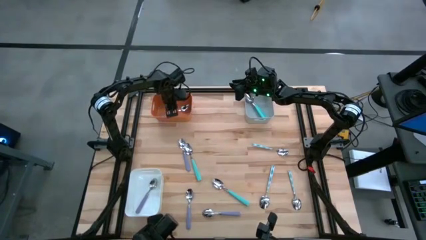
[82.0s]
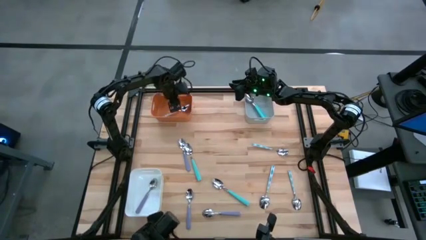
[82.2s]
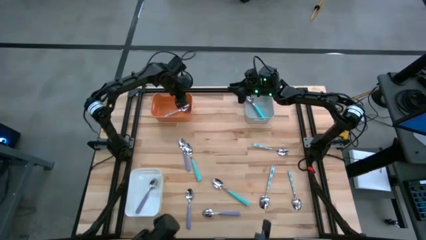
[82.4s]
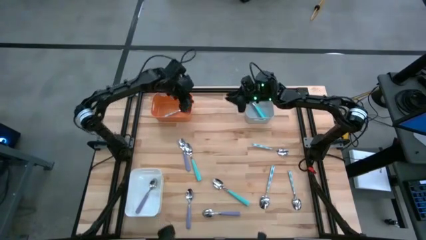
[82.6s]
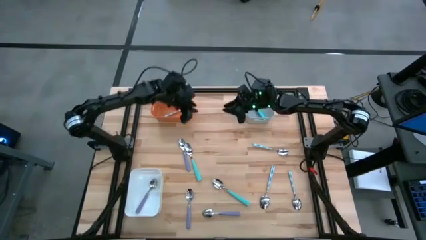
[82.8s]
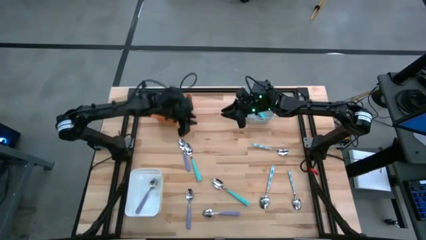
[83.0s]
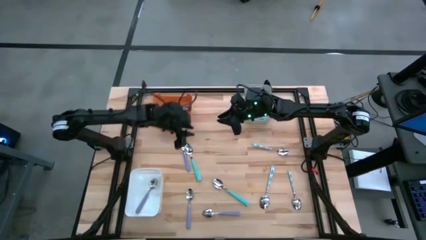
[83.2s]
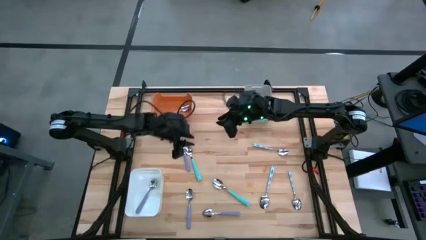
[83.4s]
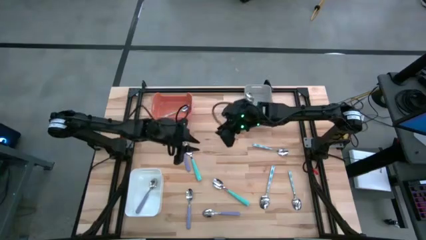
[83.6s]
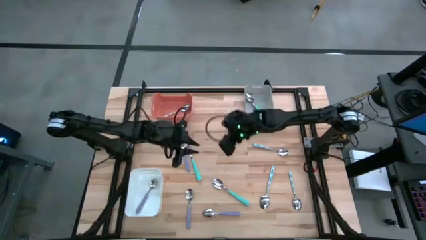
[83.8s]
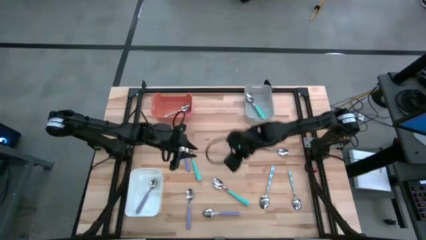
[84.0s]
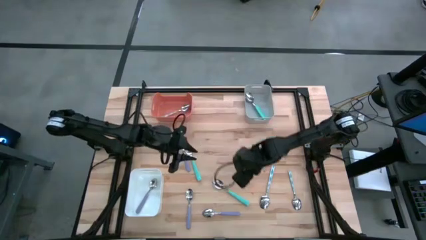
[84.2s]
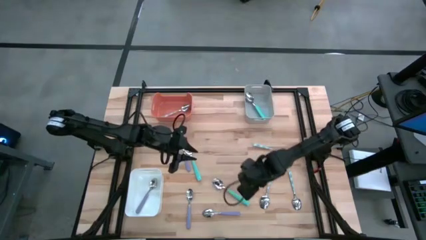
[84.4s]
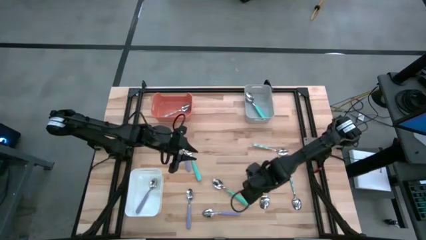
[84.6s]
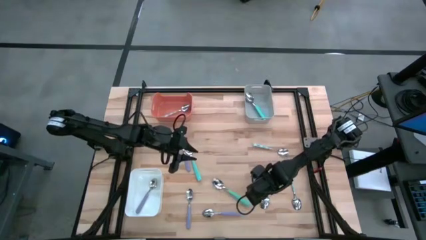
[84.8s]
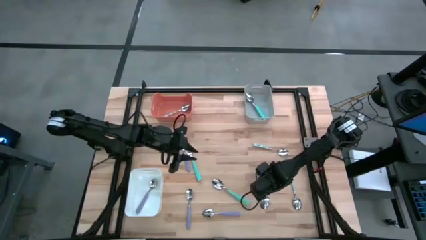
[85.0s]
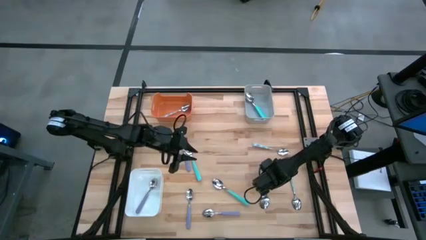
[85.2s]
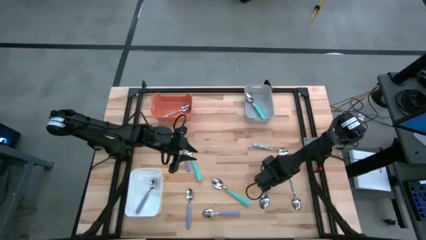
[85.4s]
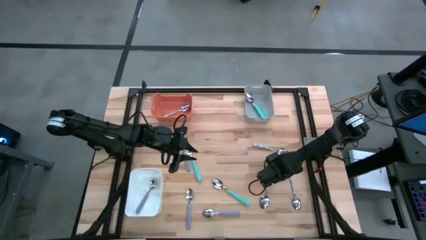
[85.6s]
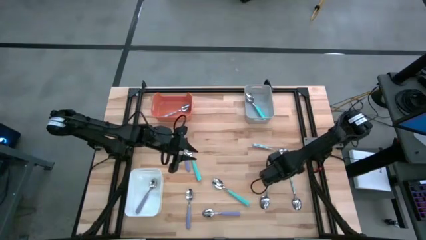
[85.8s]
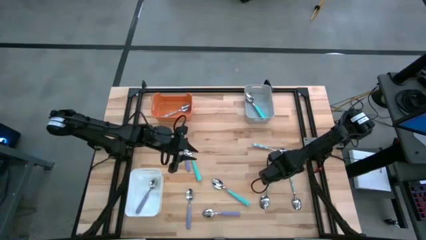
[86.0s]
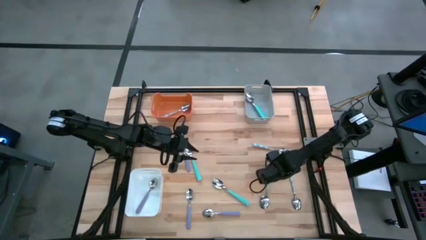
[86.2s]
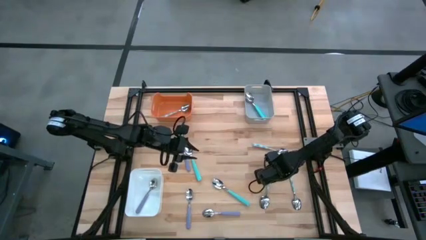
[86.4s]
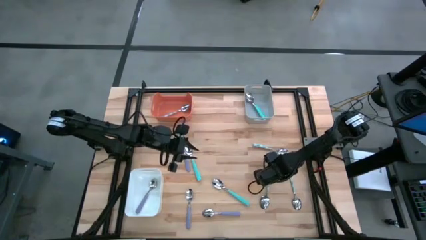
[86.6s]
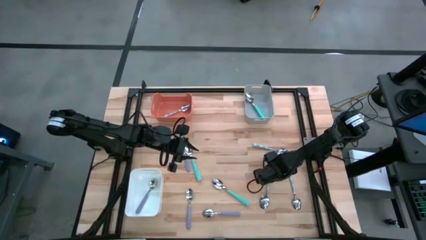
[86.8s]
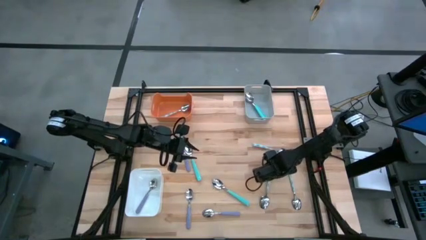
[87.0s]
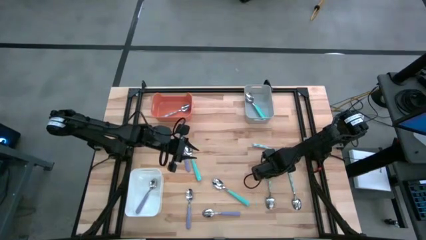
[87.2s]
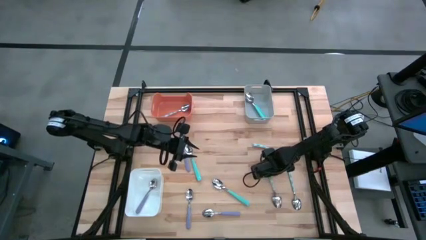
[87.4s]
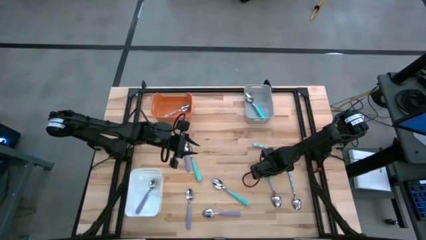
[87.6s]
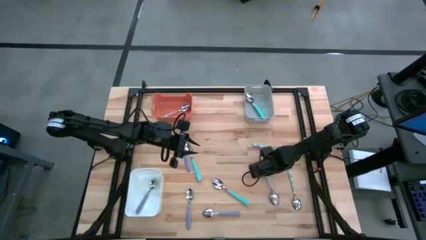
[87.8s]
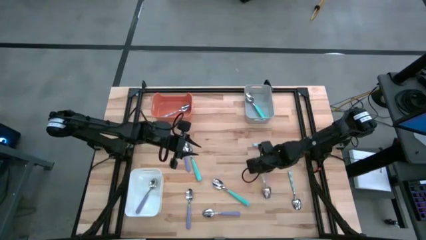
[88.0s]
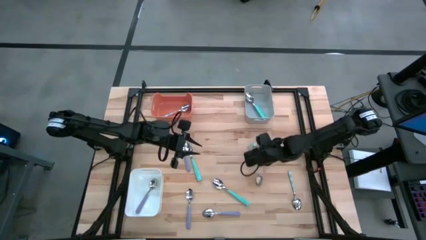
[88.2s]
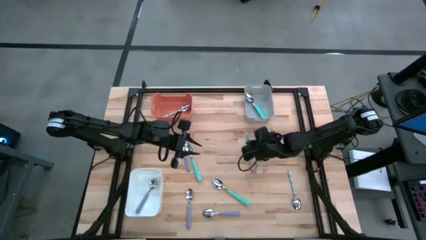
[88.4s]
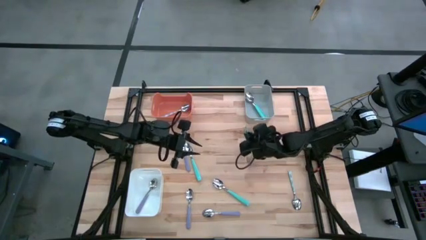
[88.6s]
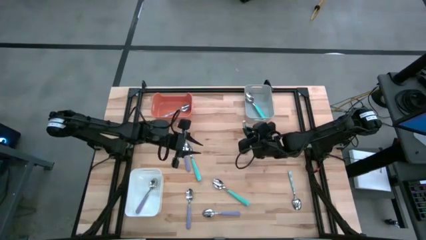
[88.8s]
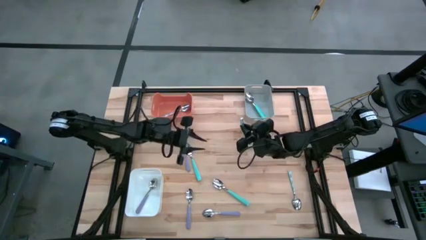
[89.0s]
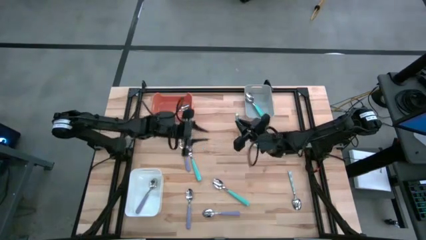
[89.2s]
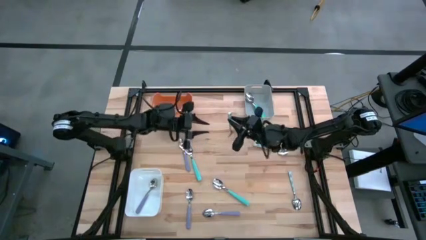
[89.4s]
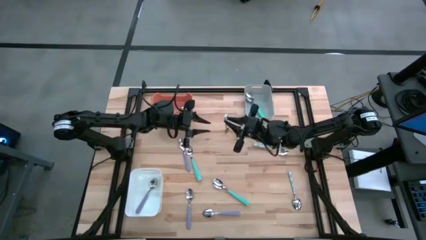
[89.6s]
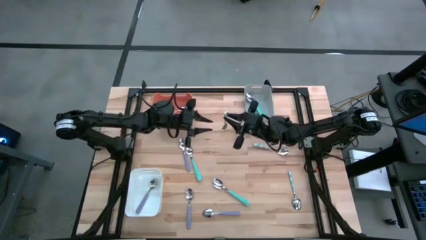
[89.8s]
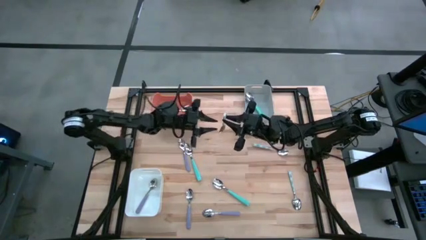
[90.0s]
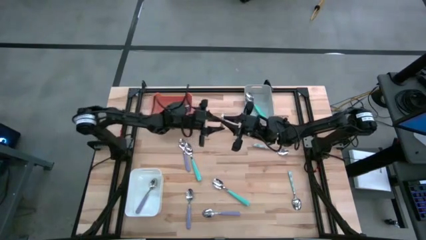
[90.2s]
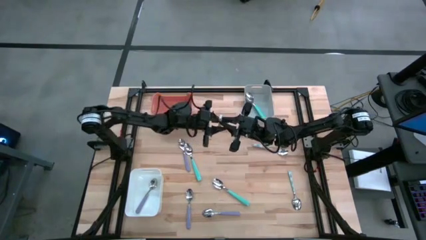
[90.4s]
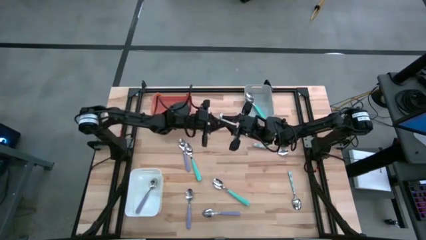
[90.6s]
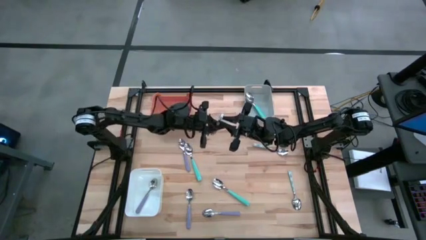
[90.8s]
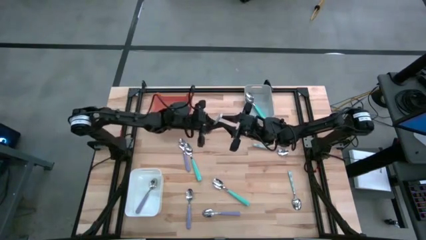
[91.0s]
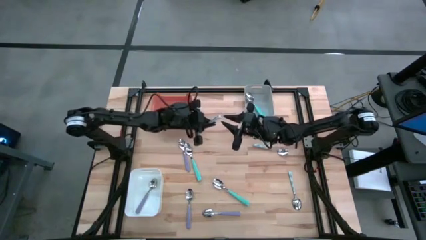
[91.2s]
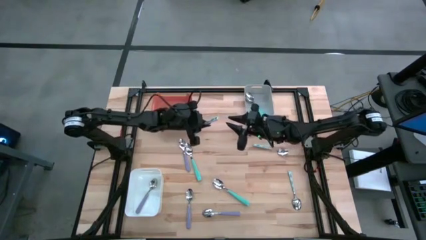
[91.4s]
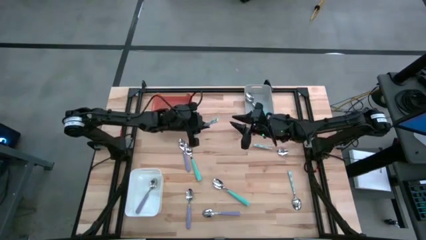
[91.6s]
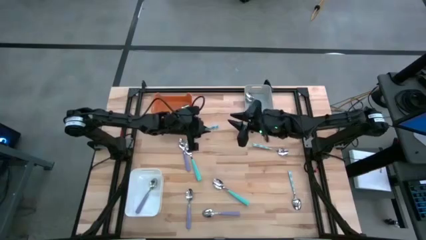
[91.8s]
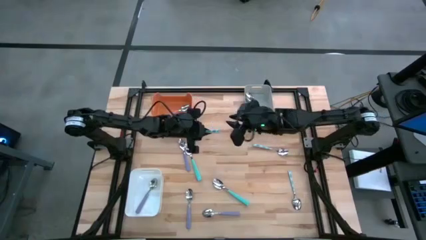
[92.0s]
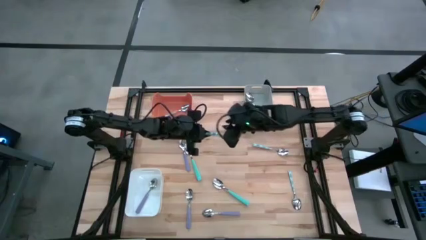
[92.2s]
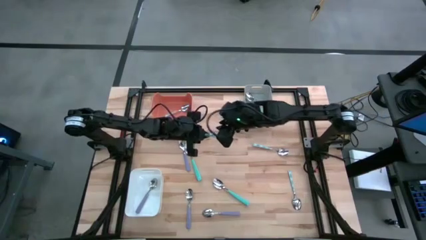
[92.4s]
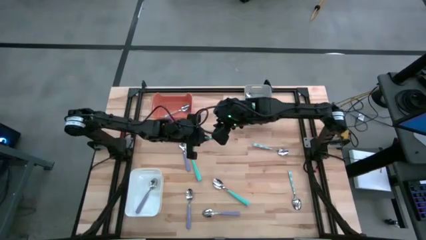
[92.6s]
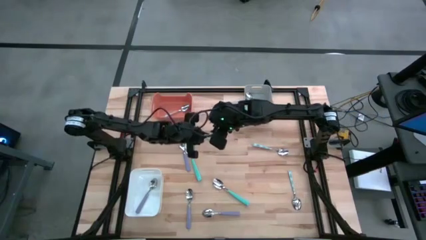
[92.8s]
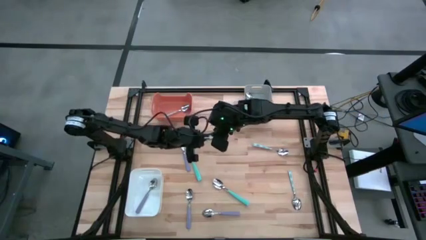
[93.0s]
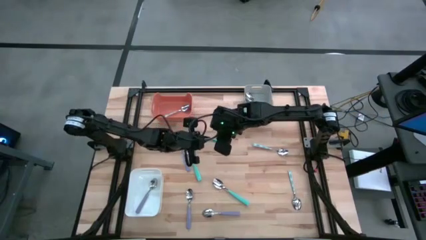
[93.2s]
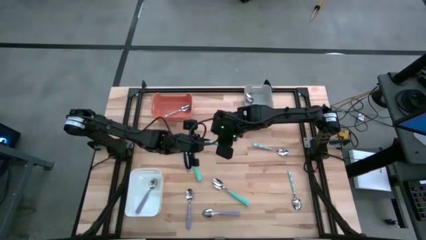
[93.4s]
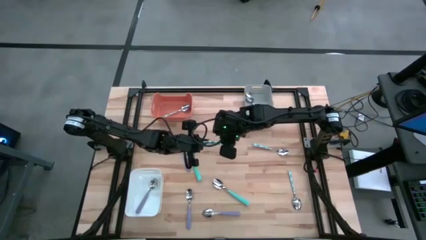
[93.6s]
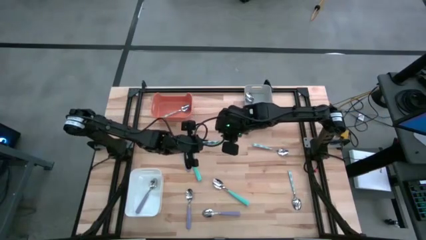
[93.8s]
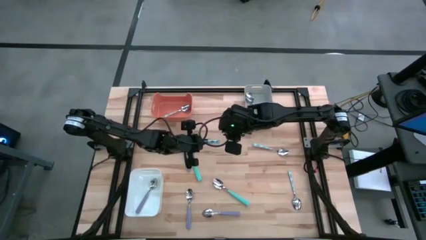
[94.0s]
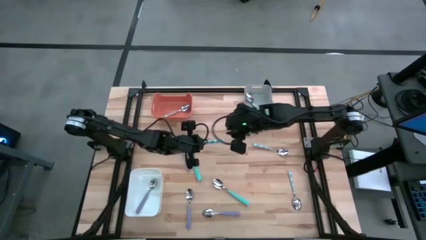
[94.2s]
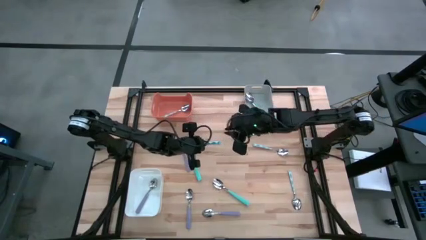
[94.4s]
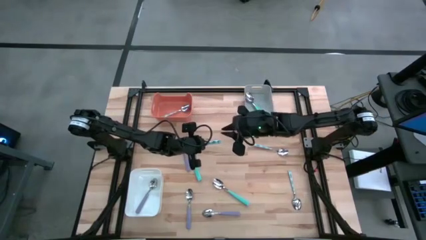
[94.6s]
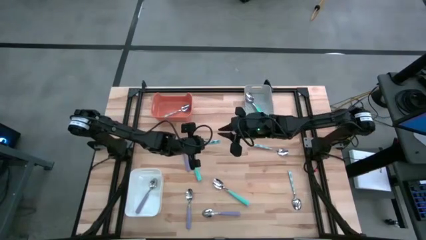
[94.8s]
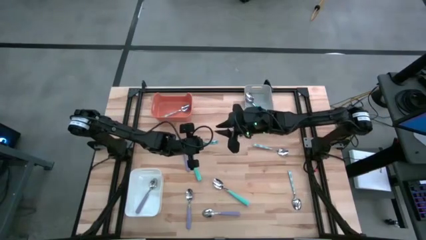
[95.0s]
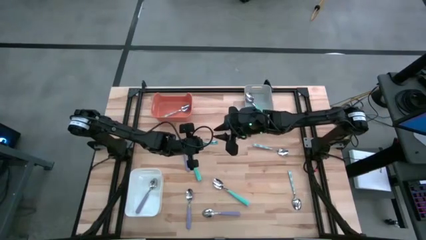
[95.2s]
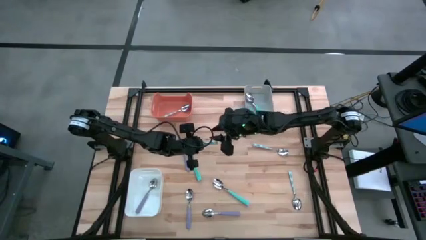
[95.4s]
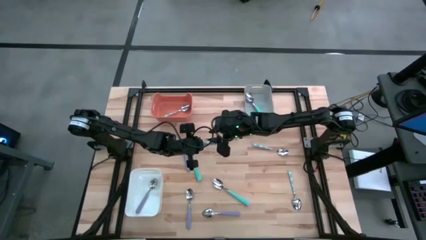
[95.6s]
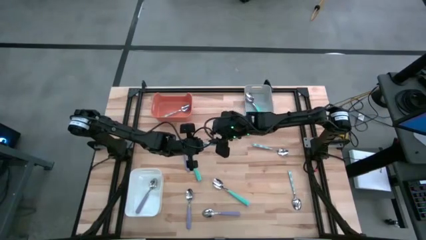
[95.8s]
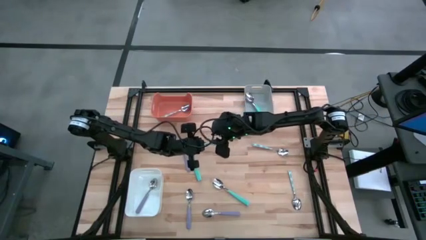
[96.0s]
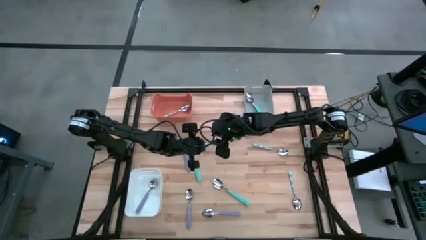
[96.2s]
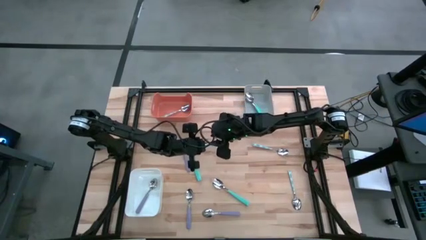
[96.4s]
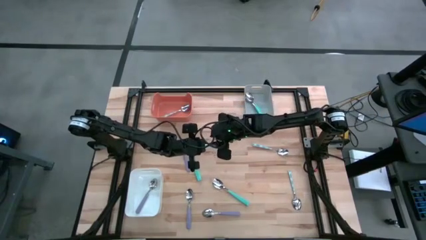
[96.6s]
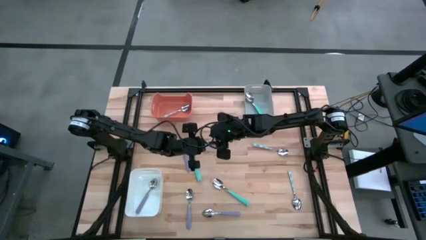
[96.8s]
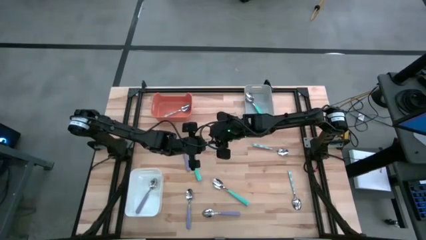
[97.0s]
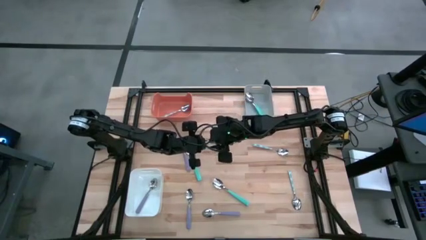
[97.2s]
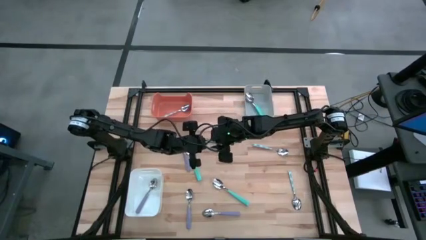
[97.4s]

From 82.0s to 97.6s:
Task: Sort silverware by color (type)
Put the bottom left blue patterned spoon into the orange bin
